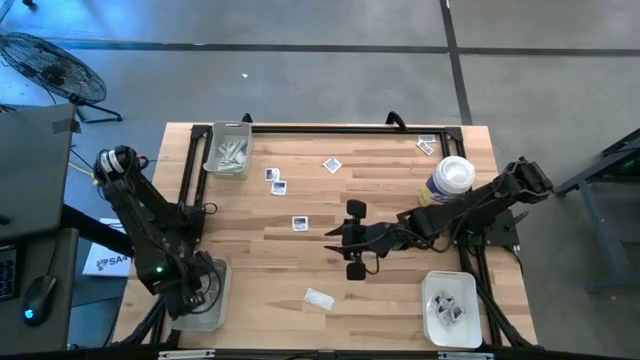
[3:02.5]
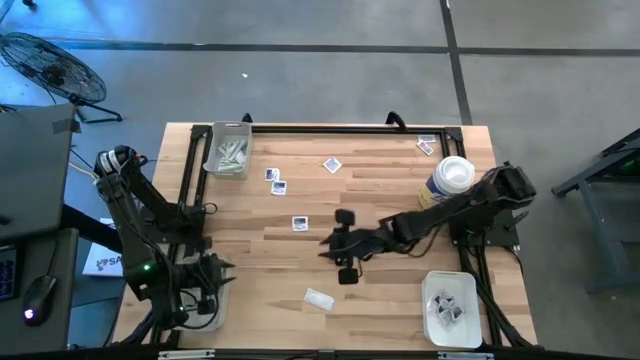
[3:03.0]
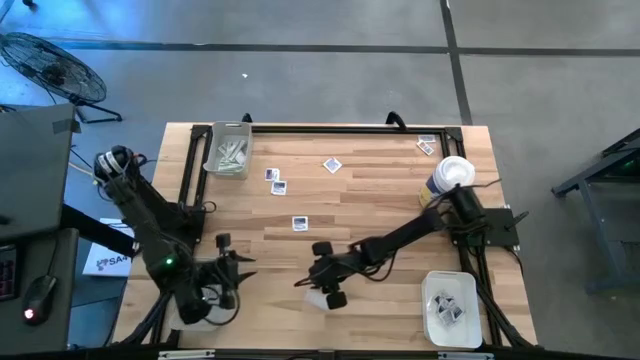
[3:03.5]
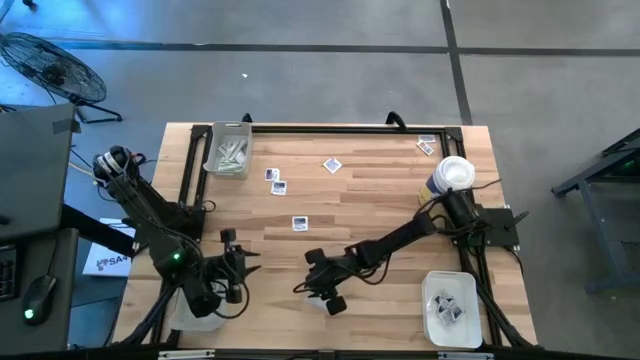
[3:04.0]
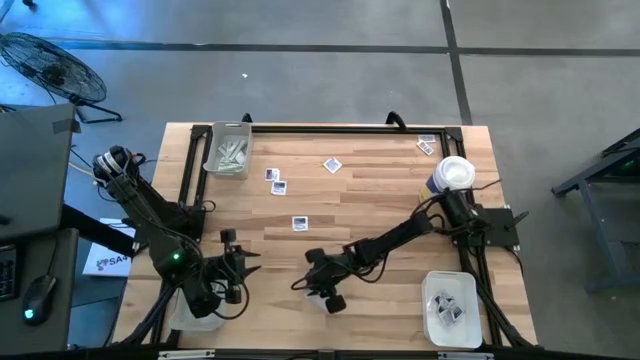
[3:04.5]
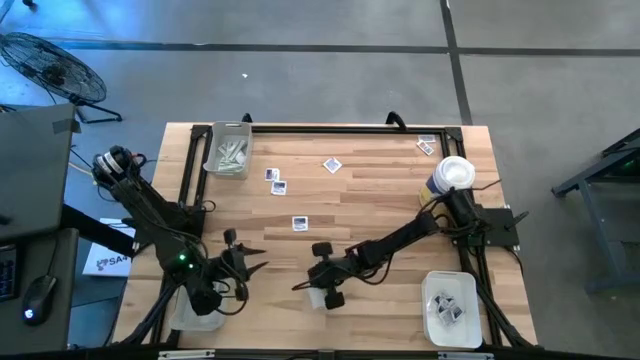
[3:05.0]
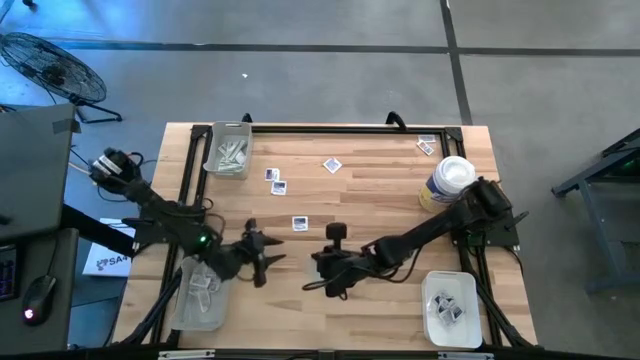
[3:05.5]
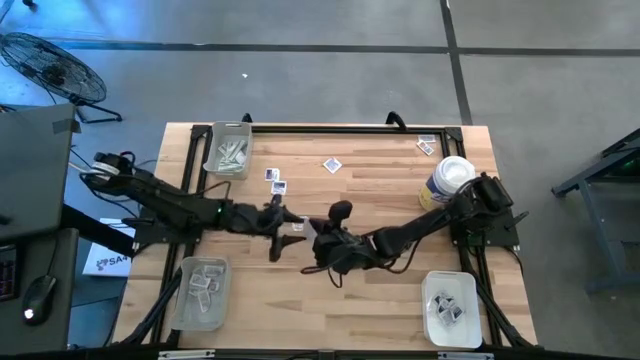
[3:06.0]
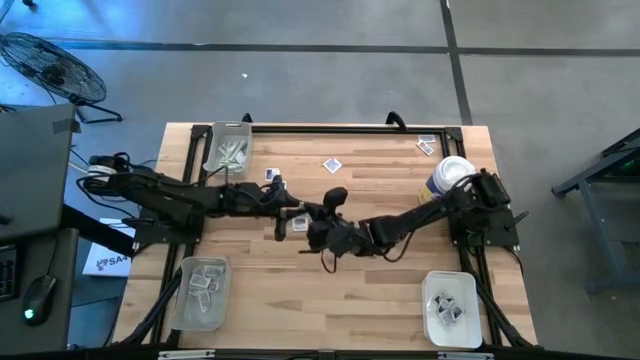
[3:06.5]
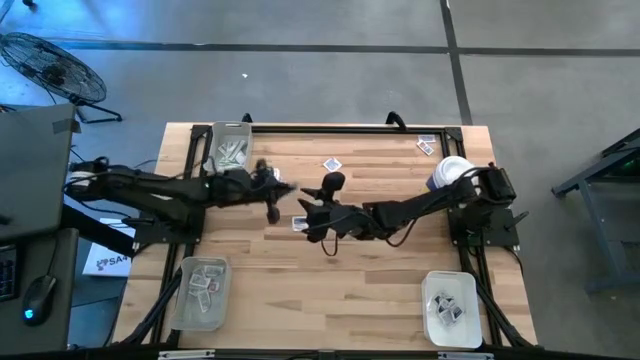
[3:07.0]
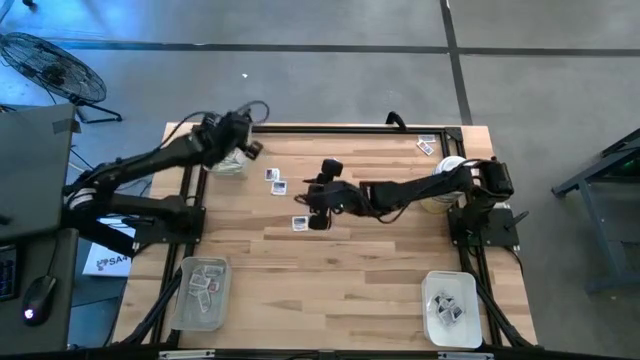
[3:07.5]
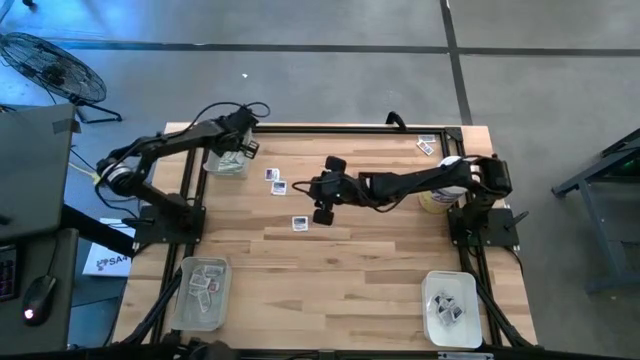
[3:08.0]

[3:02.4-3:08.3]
Task: Pick & Place First Aid Supplies
Put the green bandage pack into the top gray bin

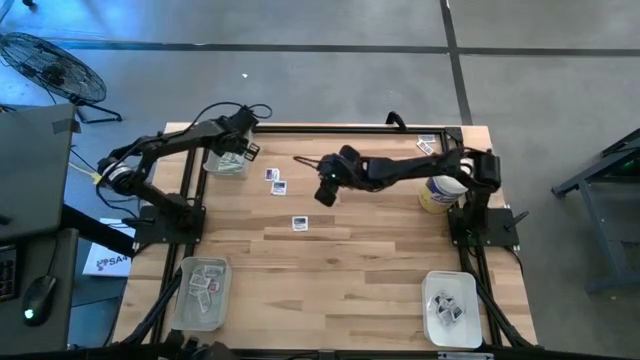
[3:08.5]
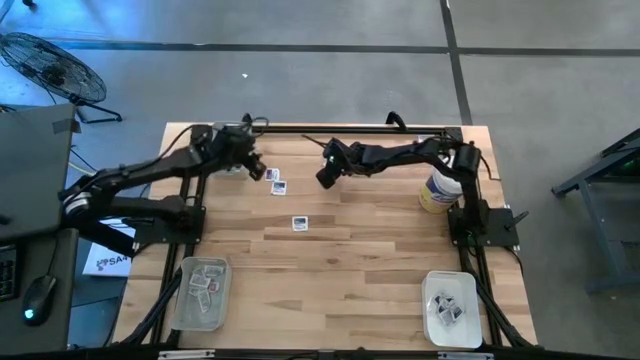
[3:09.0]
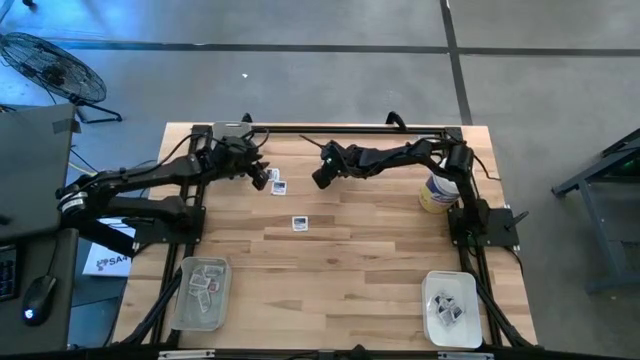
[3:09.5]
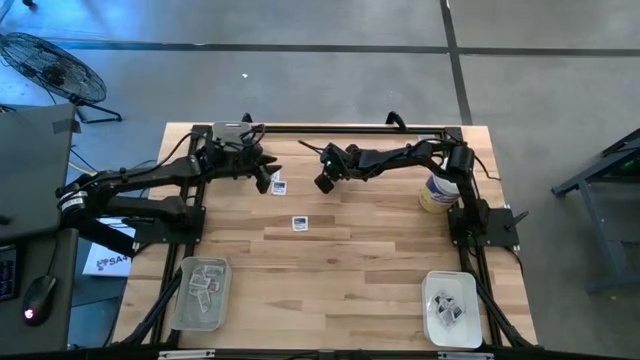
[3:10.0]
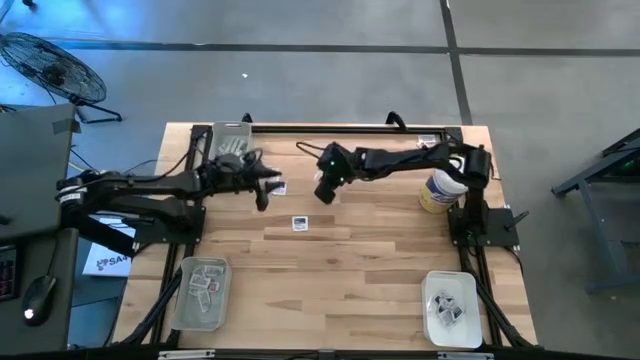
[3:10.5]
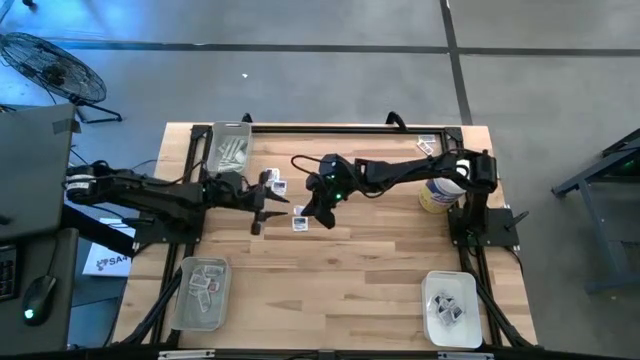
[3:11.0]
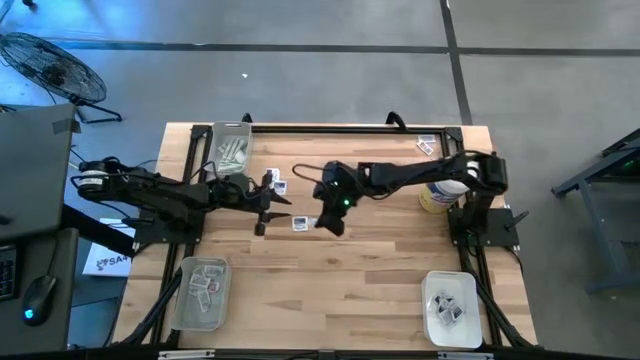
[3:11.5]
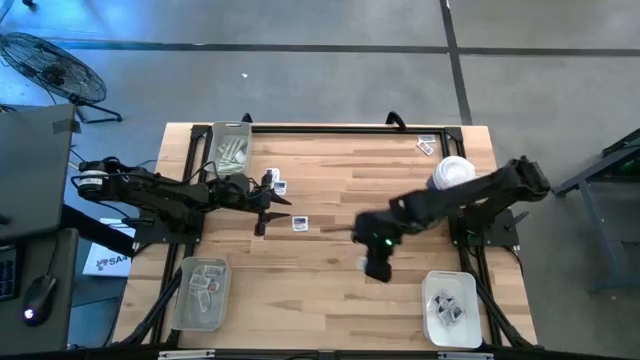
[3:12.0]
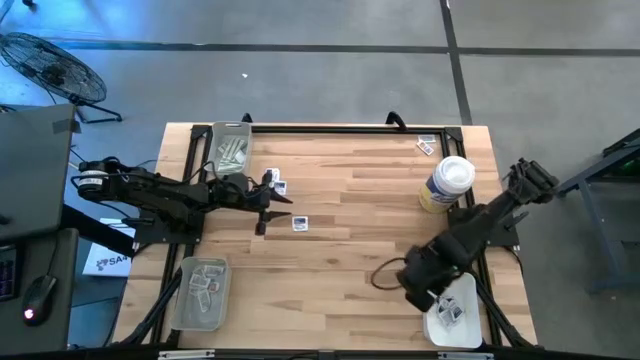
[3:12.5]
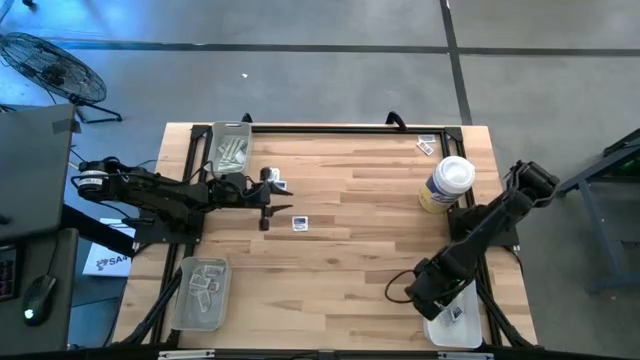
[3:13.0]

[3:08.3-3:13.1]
Put the blue alcohol pad into the white bin

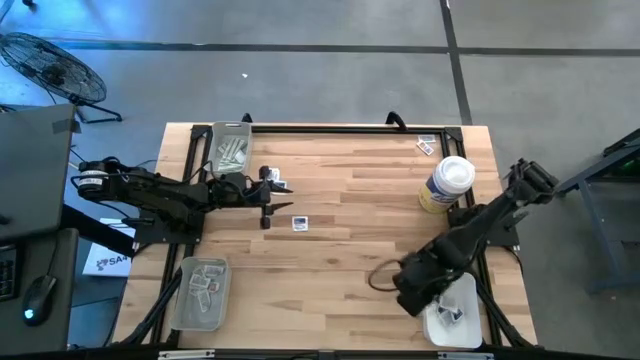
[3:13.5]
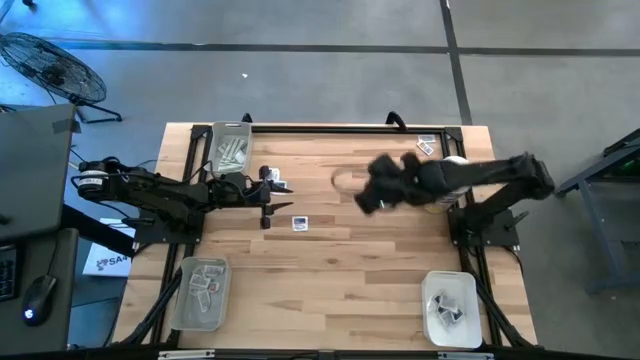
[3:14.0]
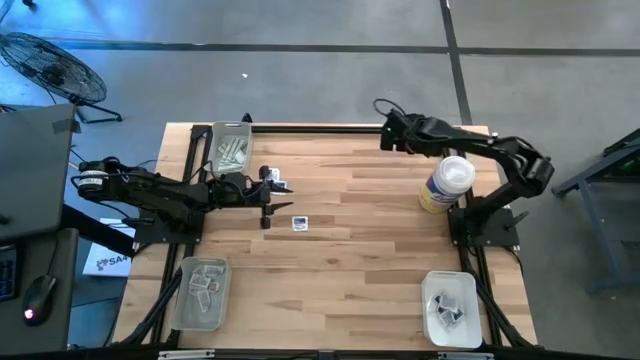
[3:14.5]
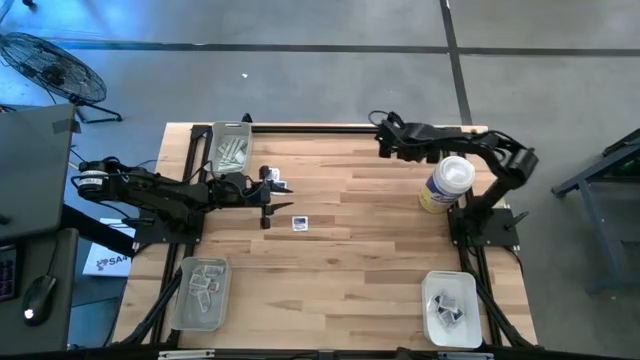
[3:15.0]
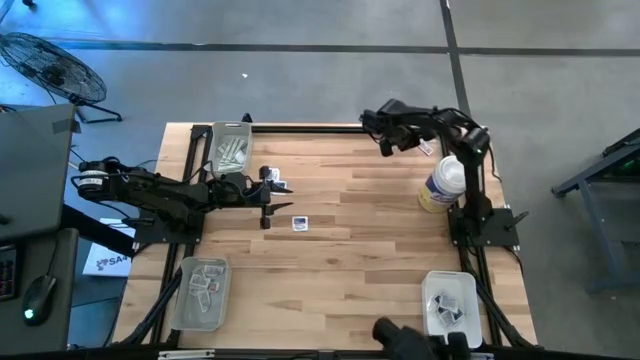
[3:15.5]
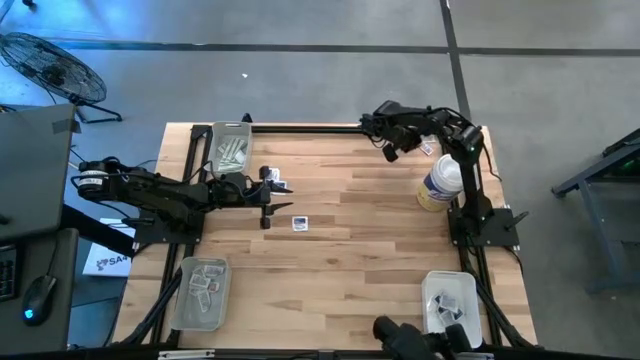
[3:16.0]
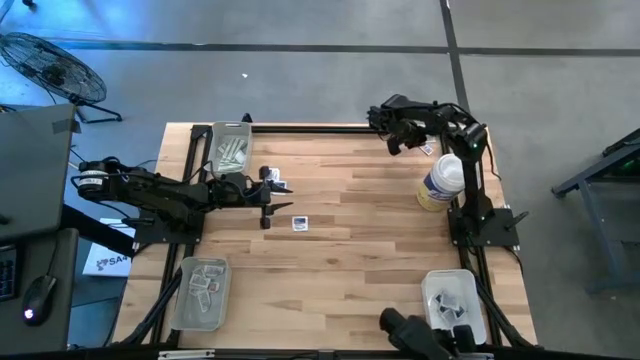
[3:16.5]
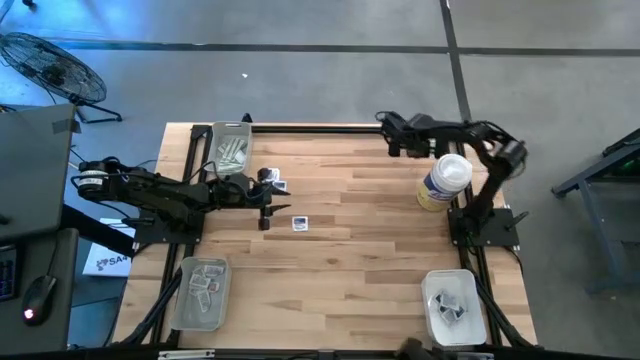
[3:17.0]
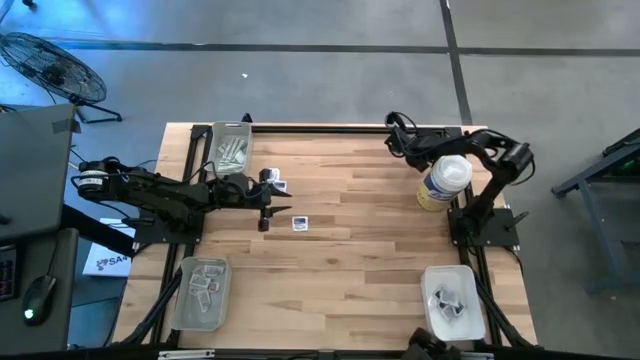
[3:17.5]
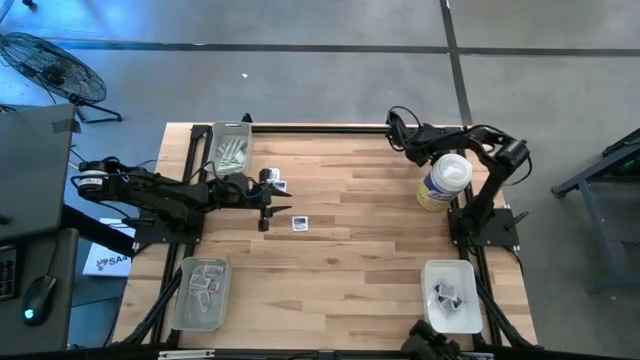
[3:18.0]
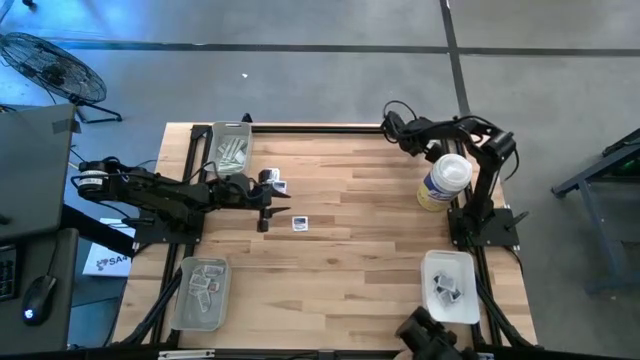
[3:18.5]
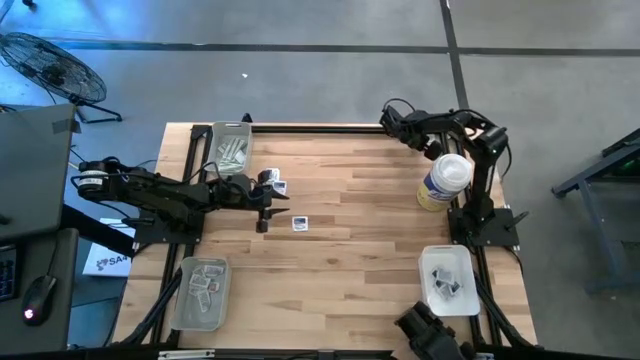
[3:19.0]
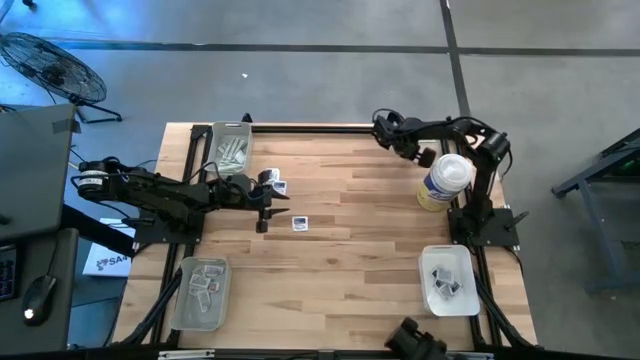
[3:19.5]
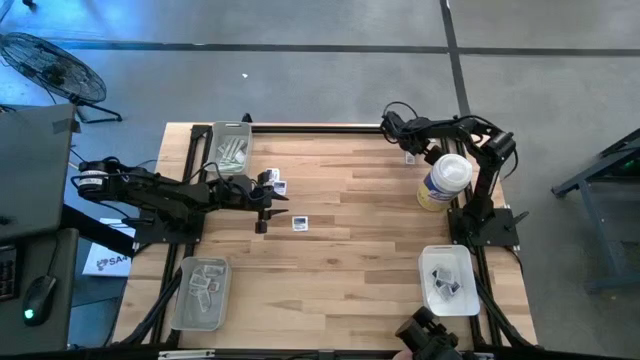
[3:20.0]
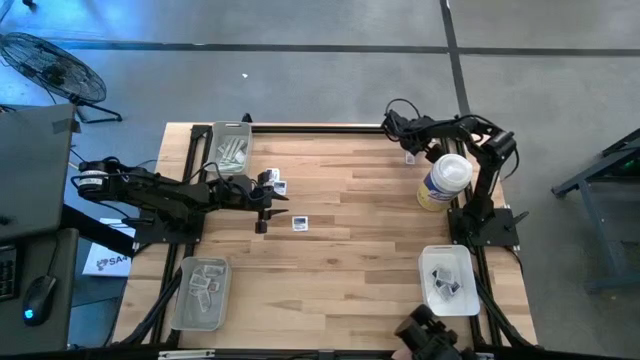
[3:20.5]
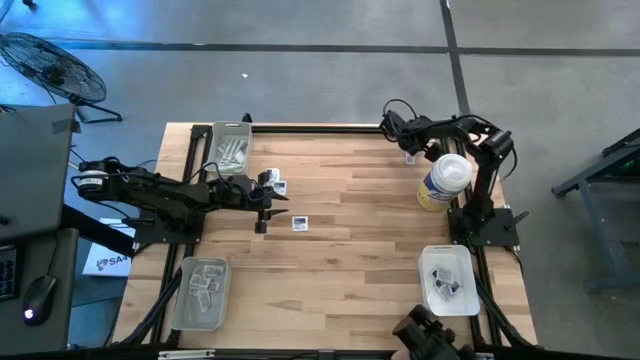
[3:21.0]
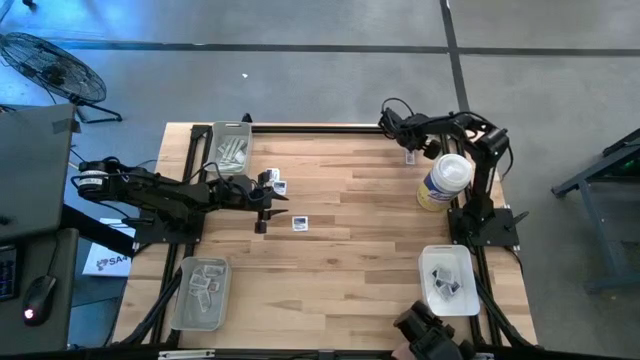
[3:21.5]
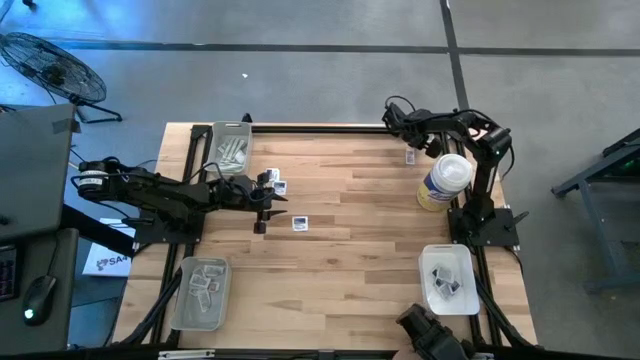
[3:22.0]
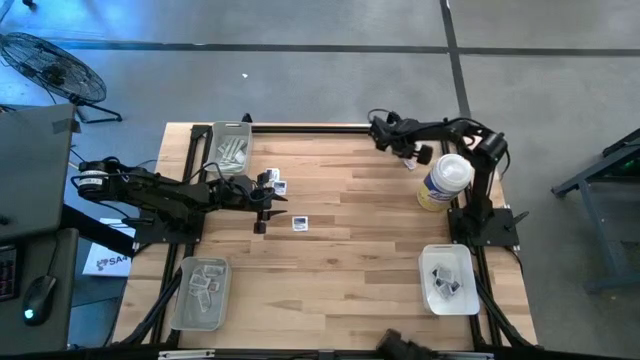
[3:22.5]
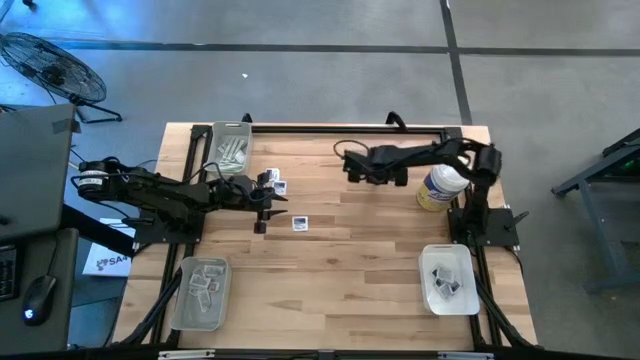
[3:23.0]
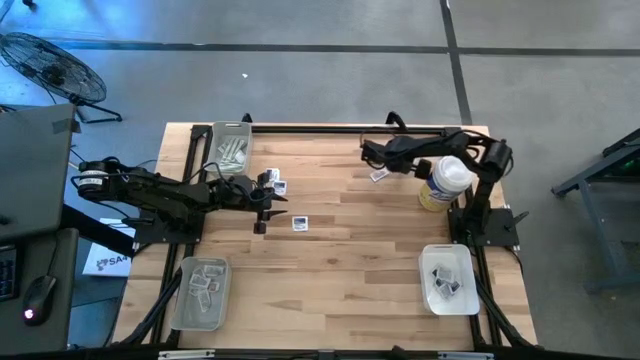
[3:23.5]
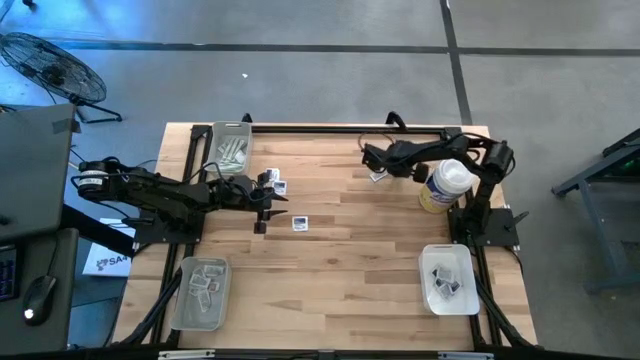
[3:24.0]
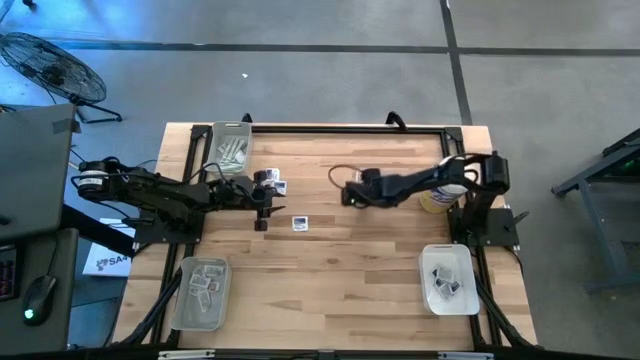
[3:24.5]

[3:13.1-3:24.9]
Move the orange ointment packs to the center of the table
